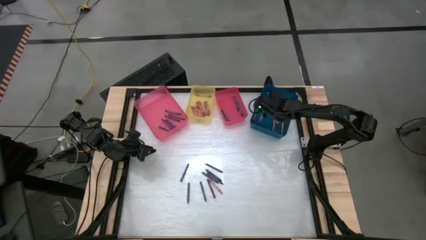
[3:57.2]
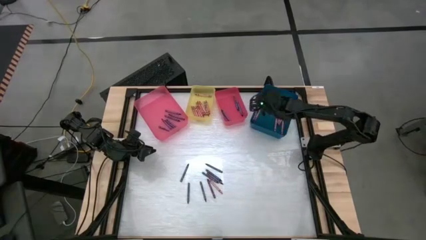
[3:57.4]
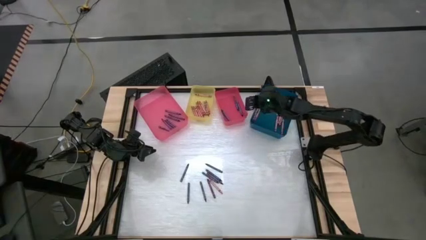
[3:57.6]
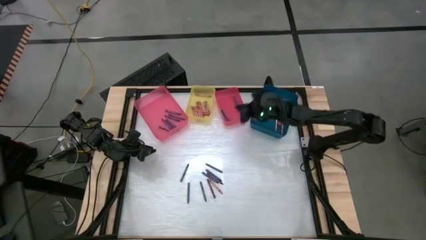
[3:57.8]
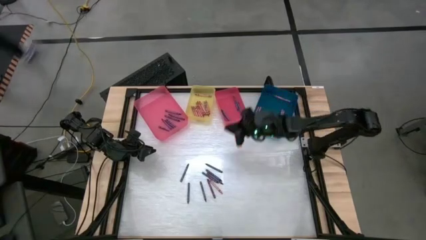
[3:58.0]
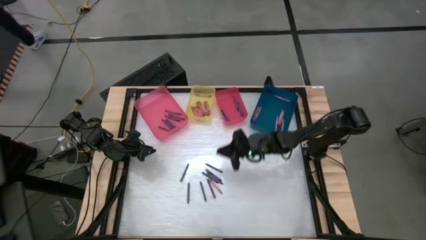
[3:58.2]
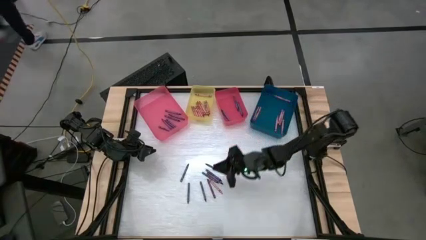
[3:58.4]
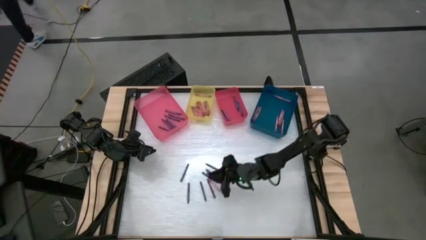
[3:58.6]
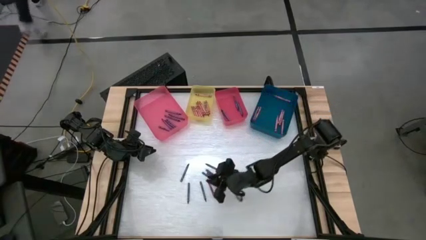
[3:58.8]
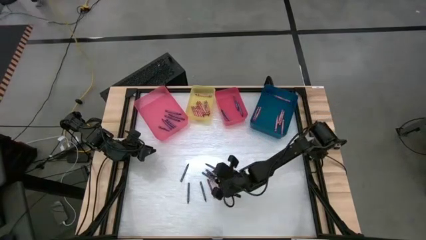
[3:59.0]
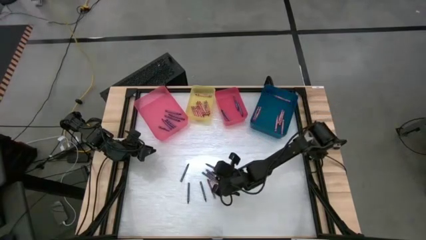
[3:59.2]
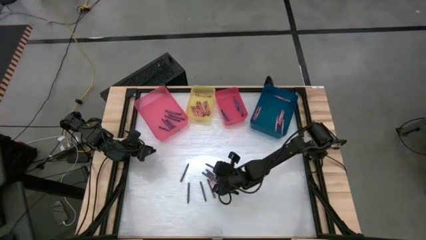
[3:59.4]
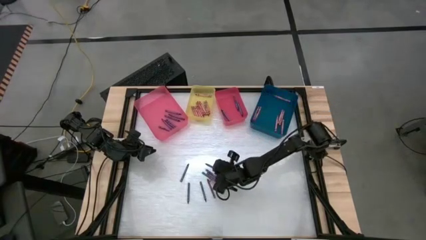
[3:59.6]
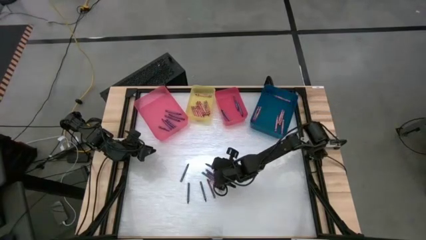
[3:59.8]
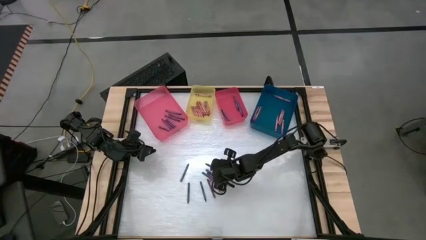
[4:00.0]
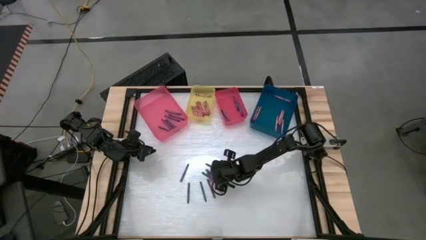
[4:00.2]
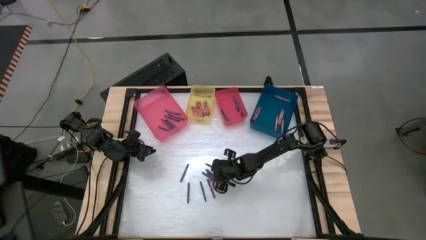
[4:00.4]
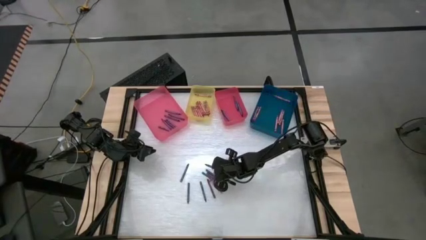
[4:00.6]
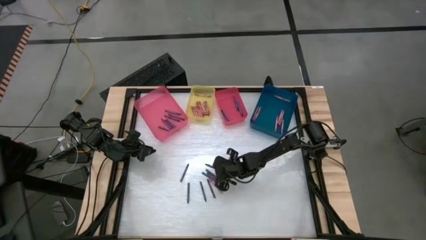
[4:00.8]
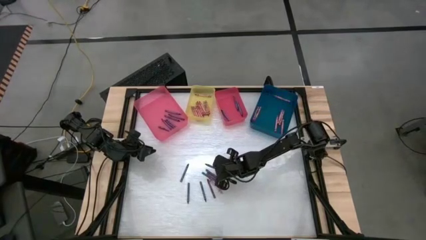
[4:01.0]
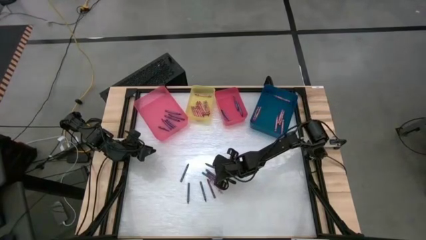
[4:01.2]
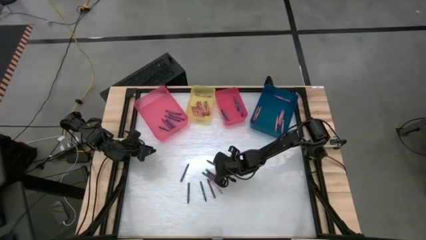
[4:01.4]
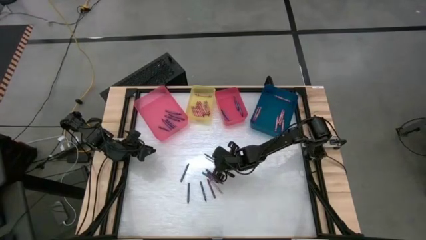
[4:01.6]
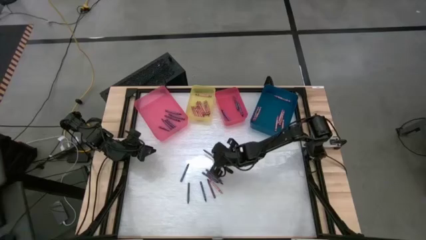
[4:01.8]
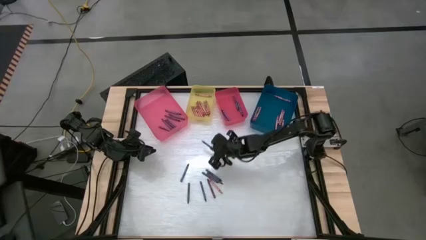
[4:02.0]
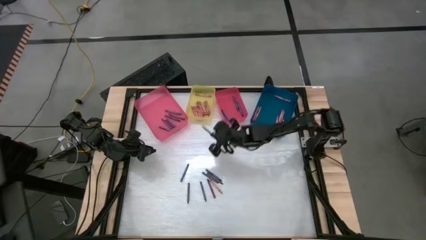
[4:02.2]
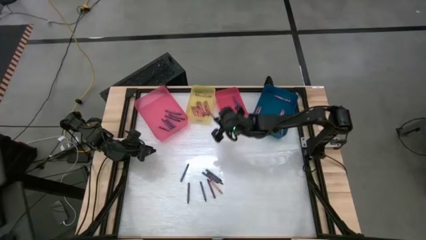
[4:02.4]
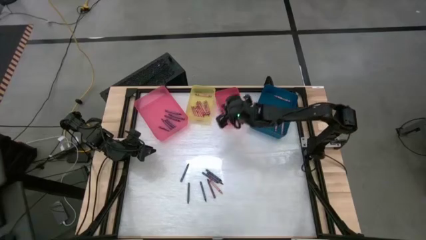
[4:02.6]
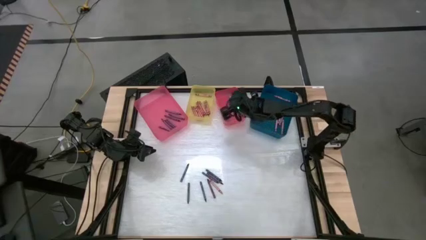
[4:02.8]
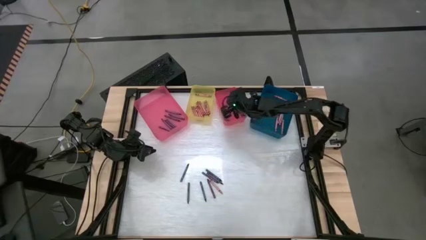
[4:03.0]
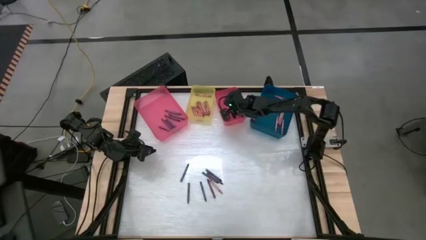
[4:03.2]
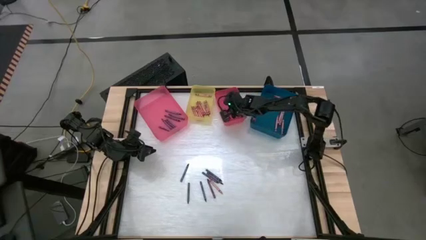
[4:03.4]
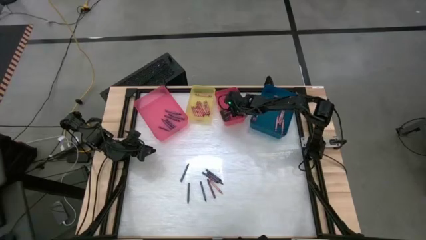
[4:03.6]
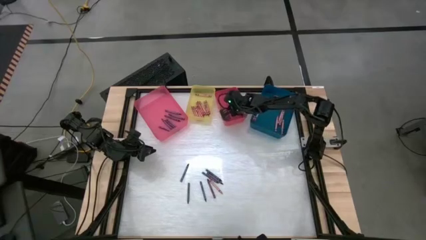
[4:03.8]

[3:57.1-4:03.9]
Task: Sort crayons
Put the blue crayon into the red bin

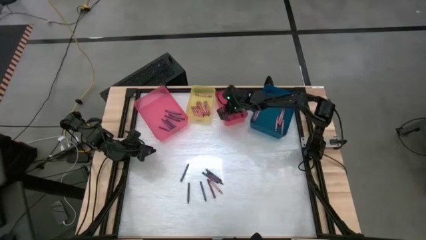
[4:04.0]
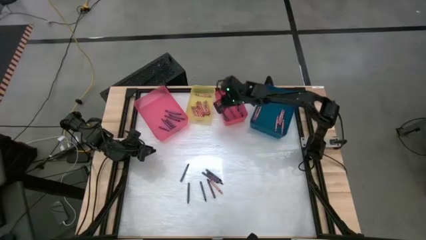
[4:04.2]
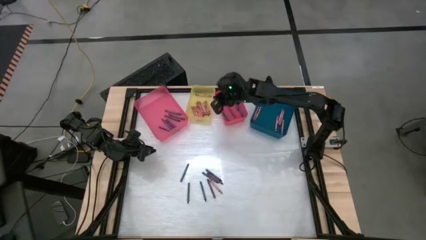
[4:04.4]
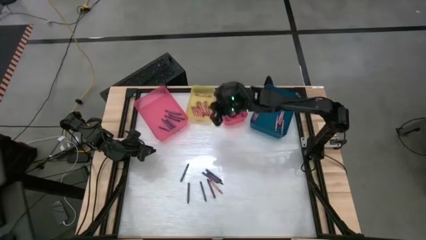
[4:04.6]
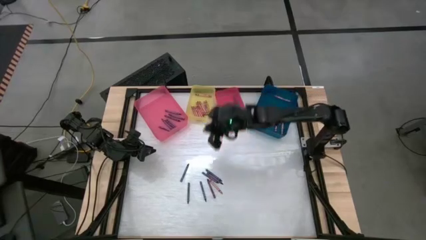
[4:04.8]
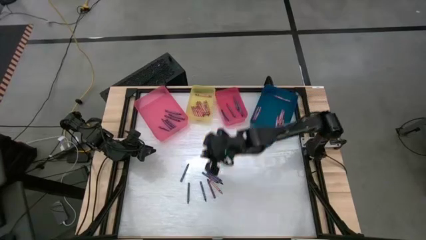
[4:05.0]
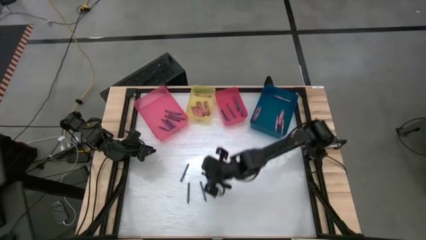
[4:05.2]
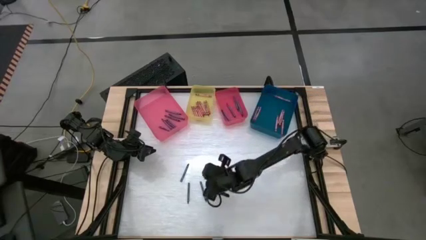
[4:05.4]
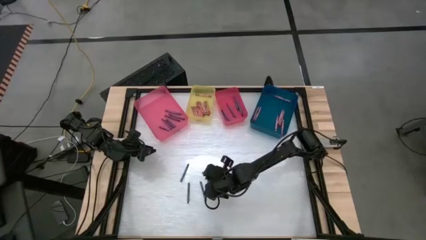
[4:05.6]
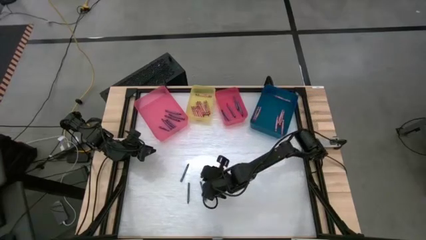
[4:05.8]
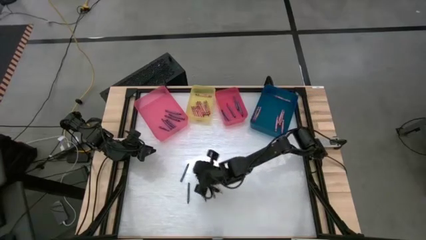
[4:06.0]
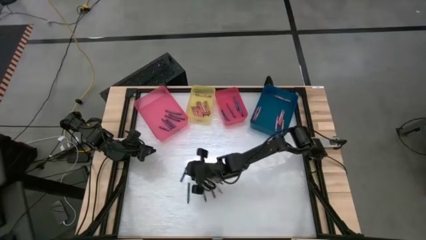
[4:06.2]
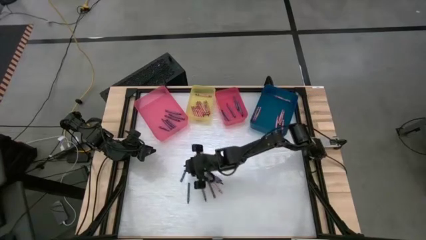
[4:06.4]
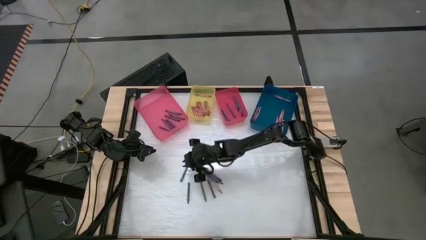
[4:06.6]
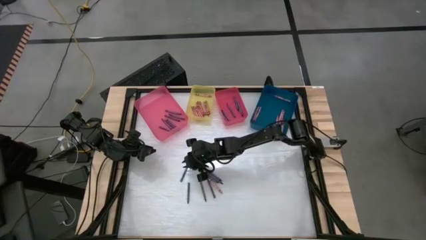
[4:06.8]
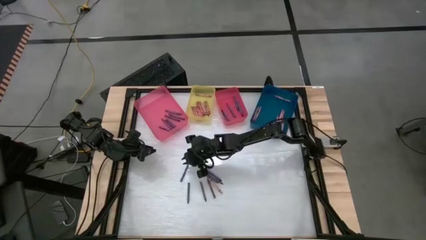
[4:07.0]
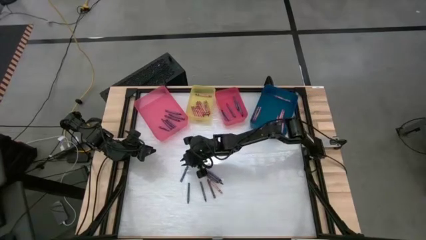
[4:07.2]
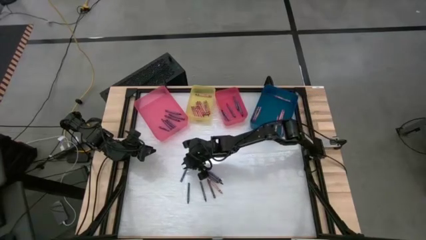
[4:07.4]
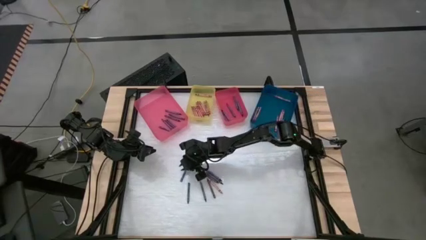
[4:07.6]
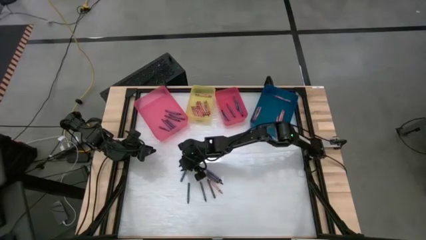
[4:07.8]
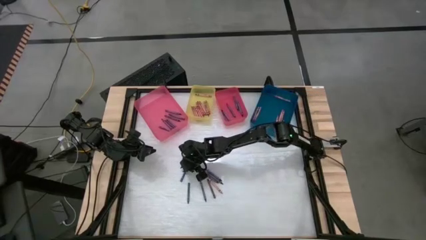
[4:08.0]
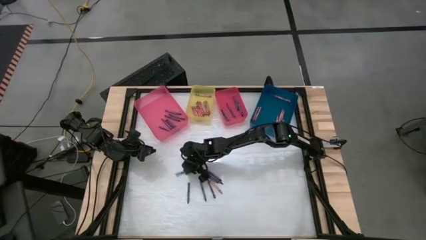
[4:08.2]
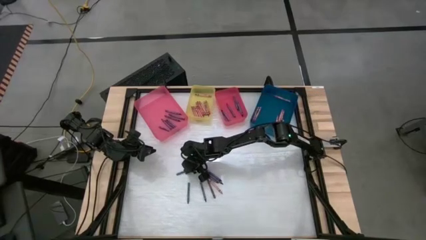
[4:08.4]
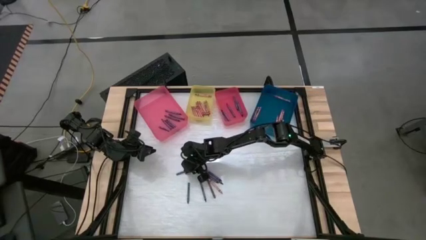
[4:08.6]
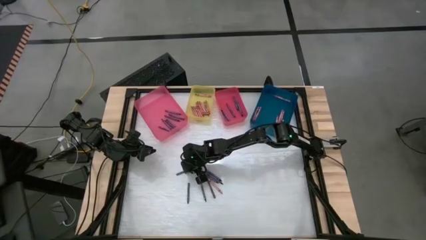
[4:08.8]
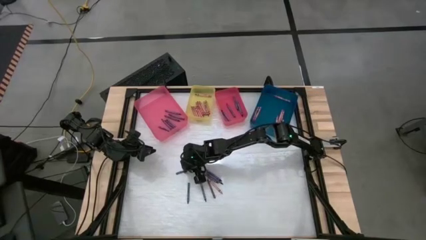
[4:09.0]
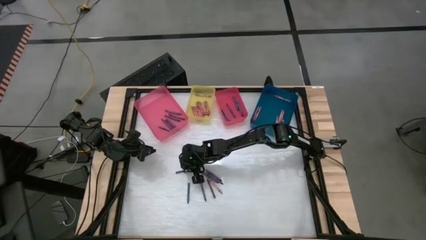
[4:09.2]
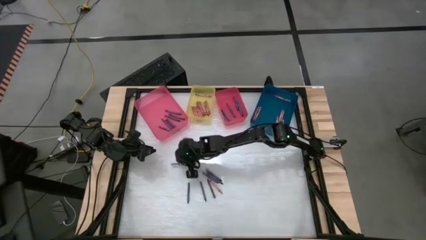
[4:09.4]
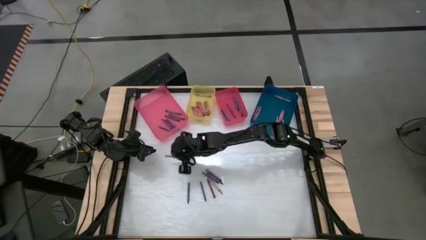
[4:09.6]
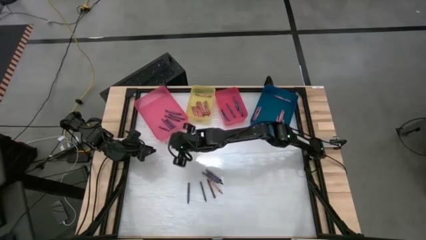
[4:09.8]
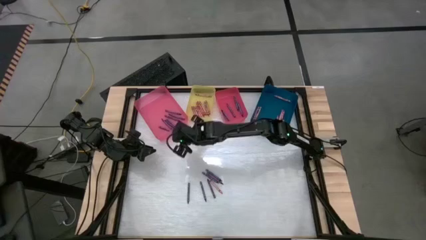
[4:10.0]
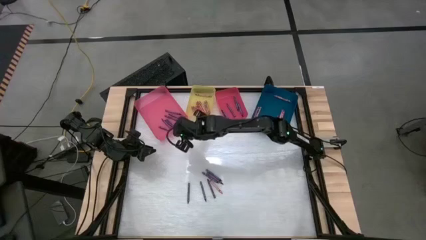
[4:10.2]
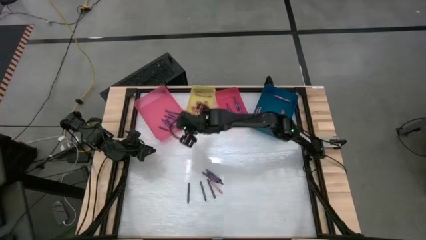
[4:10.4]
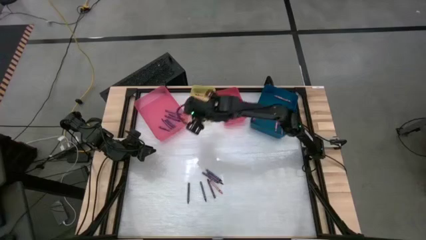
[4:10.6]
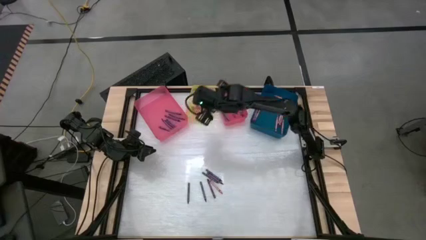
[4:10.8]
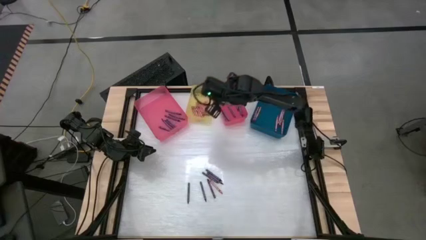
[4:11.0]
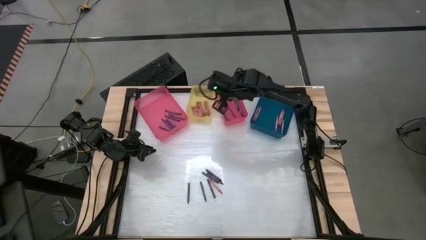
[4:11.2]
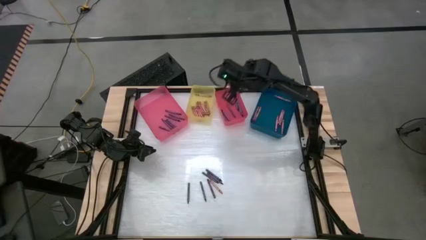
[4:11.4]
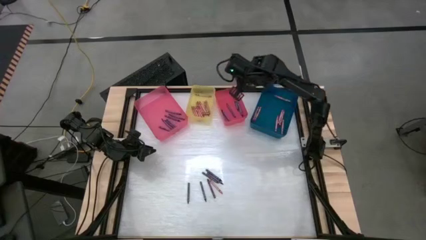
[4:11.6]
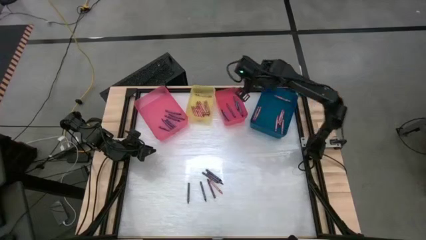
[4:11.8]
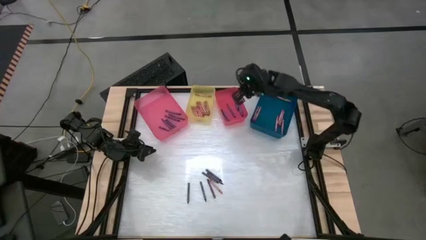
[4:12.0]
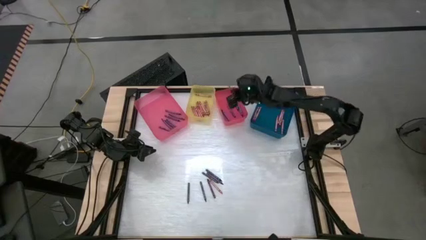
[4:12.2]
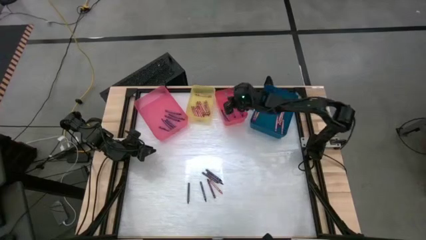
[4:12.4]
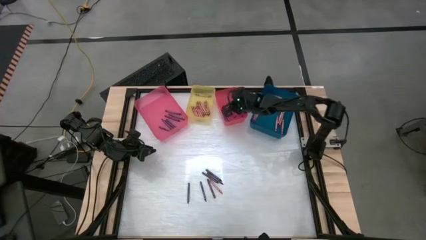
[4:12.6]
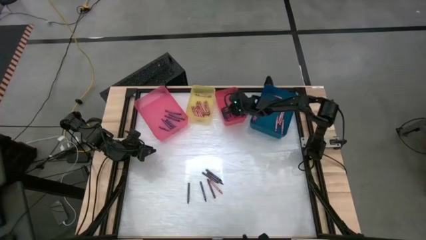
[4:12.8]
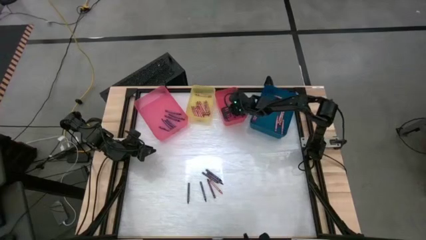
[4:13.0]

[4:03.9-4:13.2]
Put the blue crayon into the red bin
